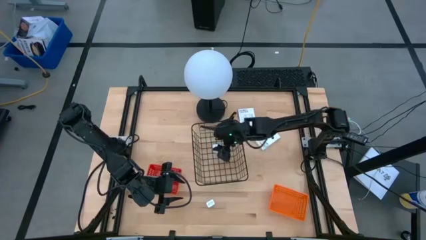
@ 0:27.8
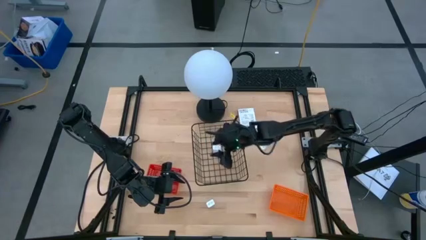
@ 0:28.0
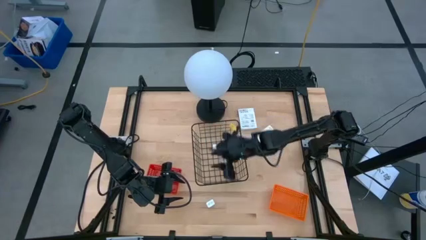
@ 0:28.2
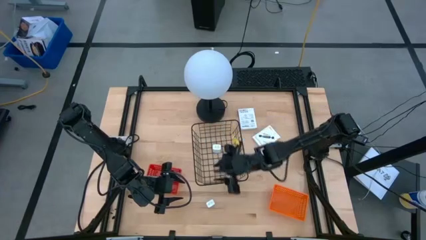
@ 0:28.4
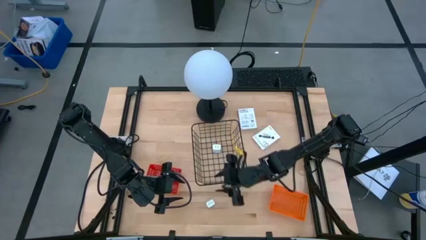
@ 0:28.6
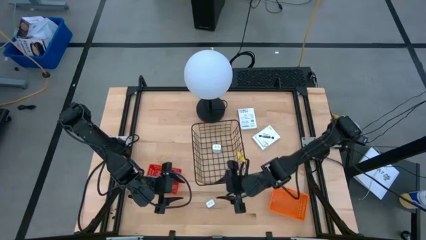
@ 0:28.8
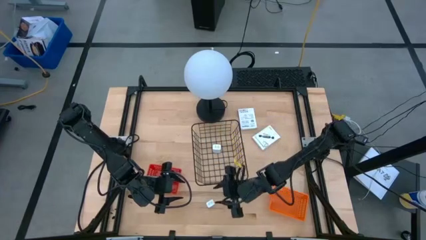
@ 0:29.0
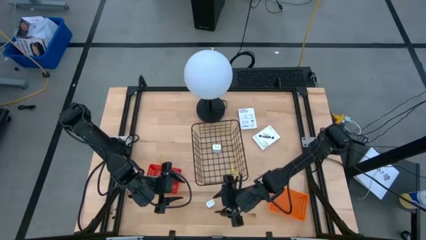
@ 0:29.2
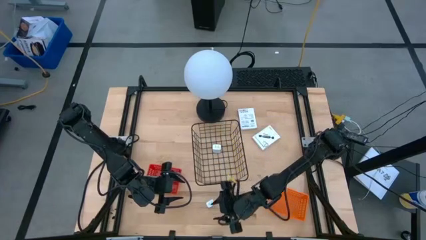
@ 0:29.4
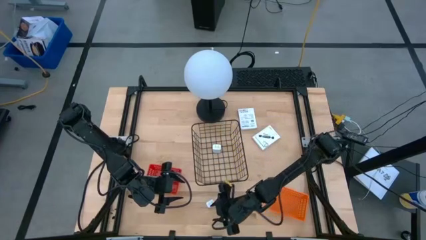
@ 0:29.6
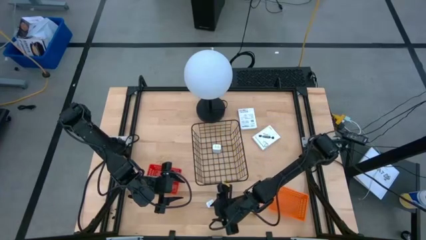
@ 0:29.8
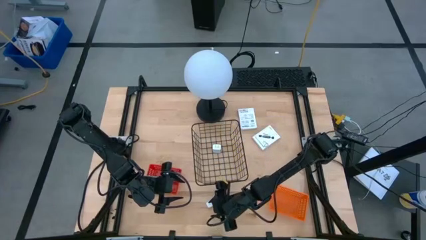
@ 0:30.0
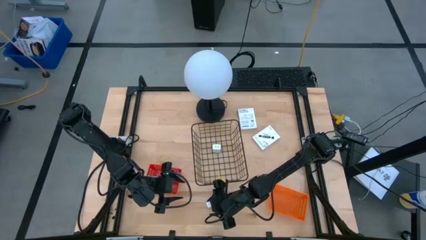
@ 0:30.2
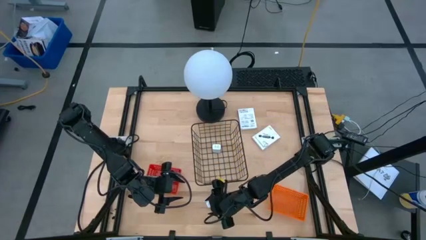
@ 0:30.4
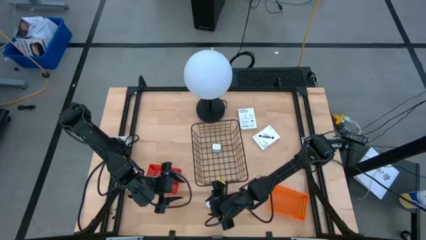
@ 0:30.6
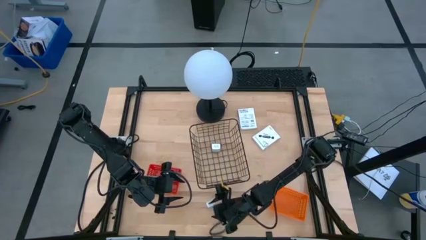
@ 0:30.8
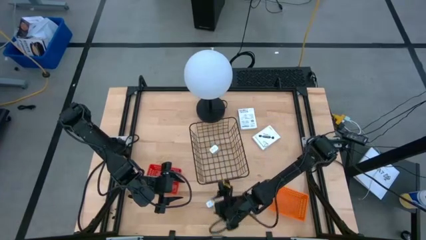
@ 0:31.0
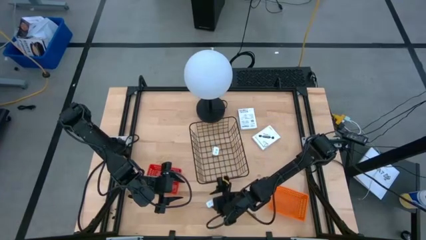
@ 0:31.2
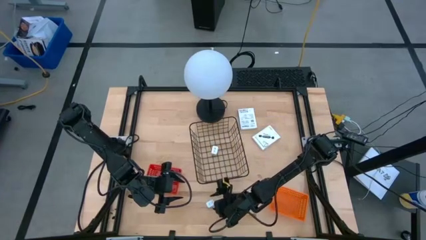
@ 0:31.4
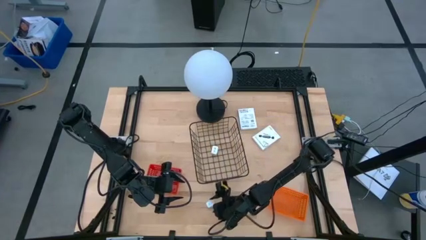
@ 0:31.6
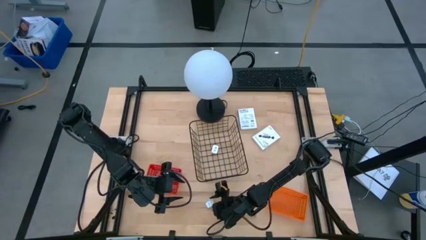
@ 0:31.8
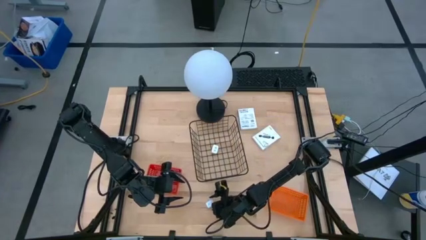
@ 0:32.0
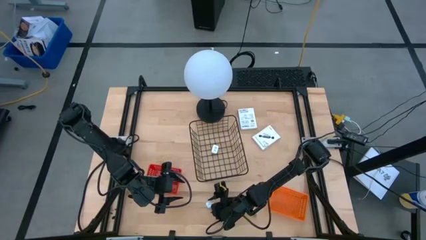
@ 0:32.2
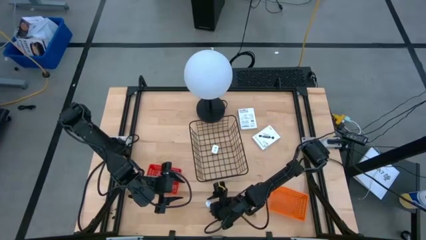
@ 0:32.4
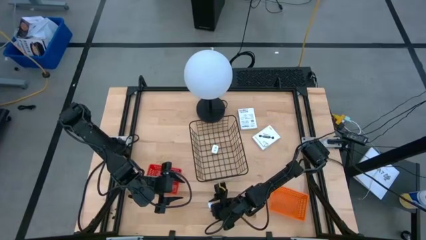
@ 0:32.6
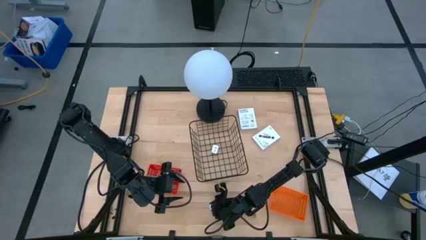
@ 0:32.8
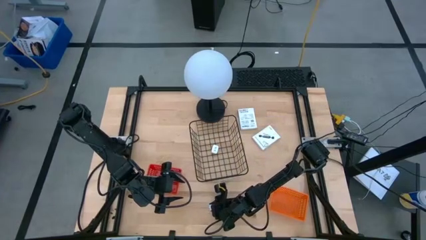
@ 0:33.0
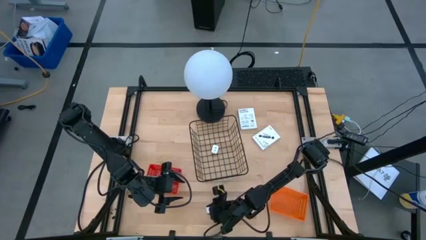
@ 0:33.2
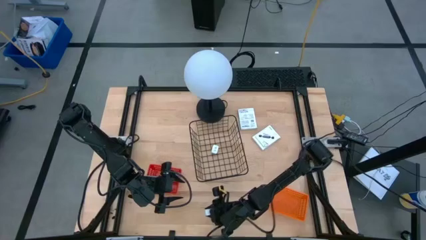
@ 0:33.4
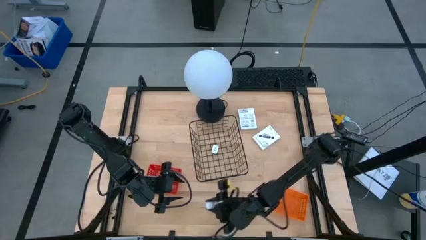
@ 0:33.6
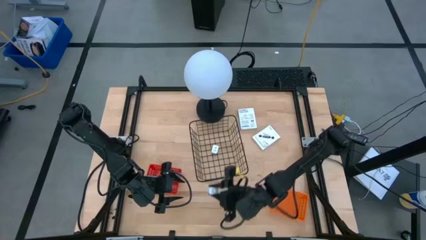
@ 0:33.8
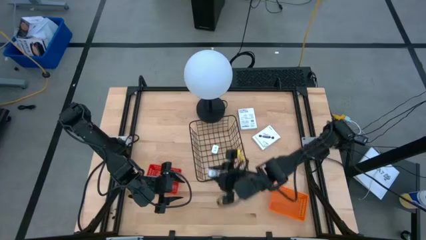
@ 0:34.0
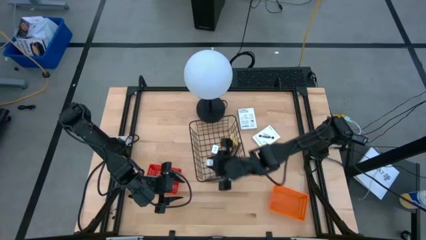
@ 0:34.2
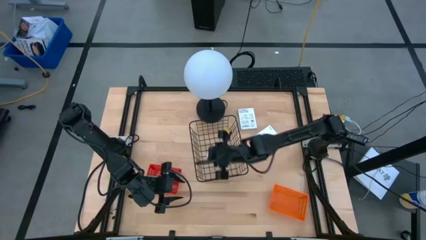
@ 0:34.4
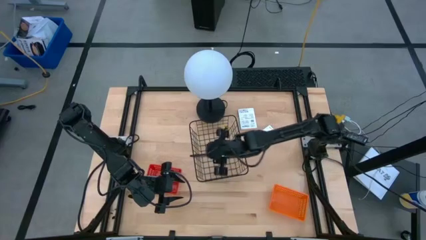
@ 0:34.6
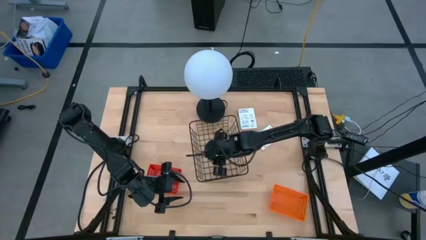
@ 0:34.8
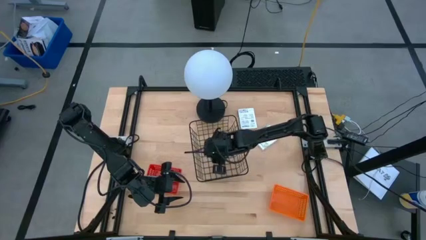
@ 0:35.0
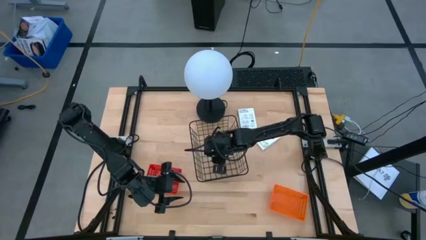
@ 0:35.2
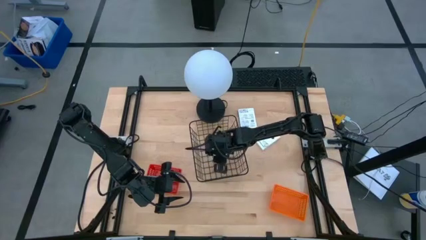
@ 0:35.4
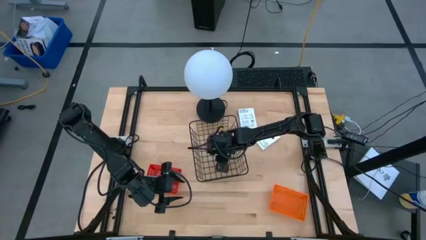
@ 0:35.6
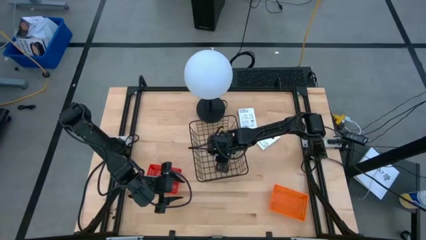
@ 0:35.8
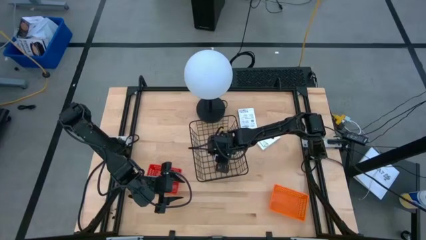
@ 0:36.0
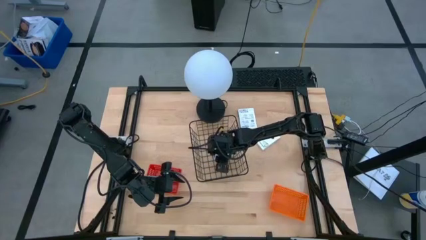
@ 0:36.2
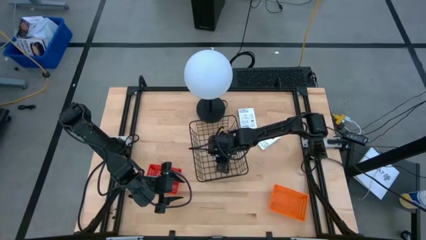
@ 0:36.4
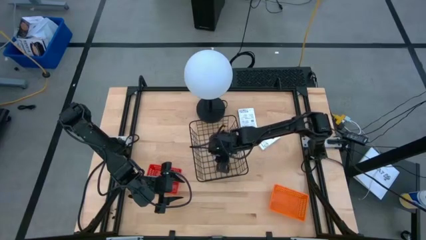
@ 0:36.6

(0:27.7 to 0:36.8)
Task: Pick and place items into bin
Put the charger adapter into the wire basket

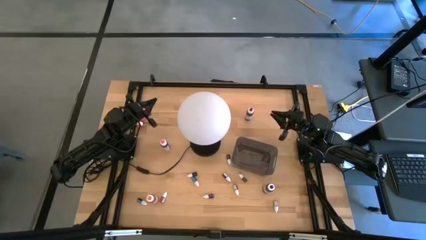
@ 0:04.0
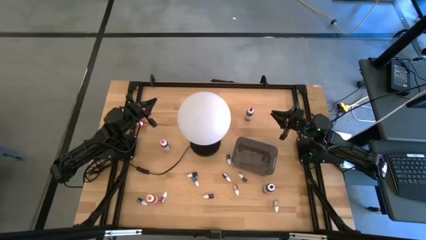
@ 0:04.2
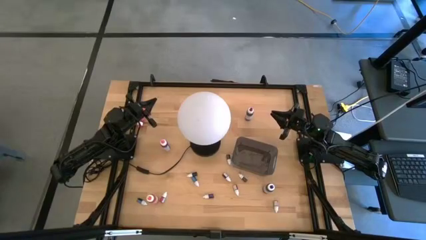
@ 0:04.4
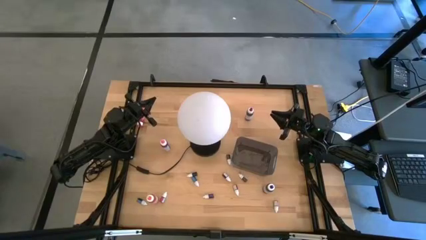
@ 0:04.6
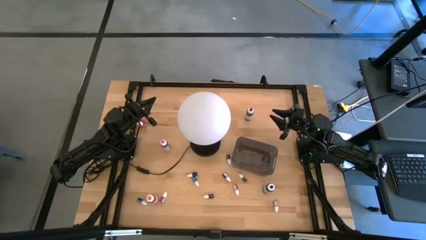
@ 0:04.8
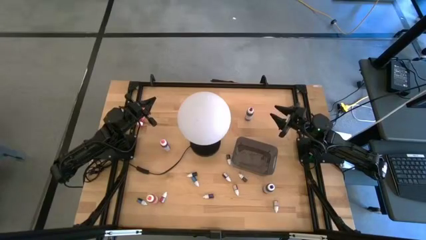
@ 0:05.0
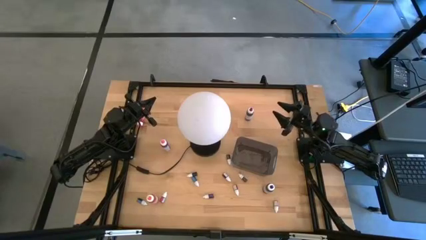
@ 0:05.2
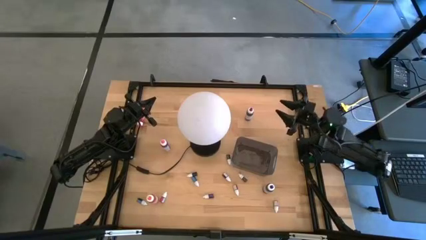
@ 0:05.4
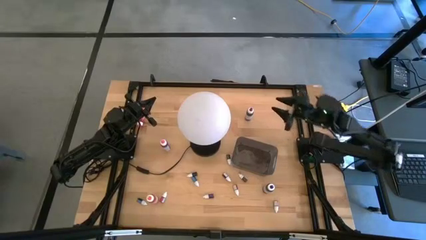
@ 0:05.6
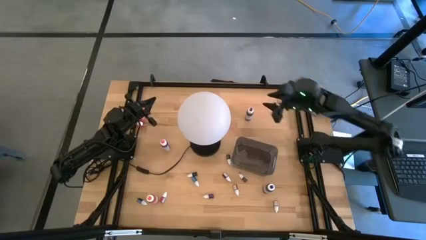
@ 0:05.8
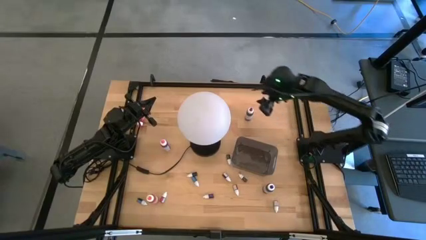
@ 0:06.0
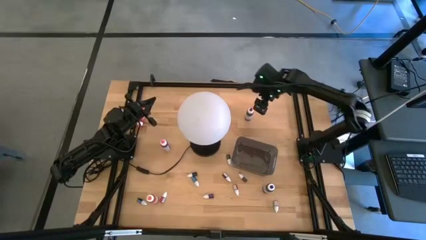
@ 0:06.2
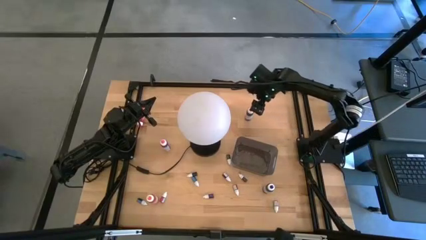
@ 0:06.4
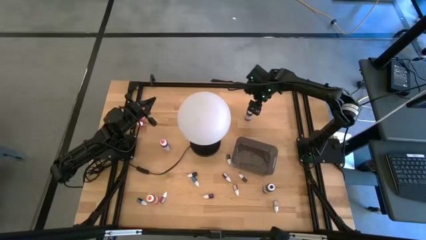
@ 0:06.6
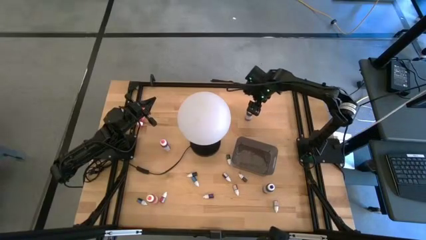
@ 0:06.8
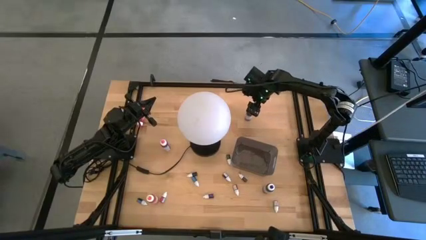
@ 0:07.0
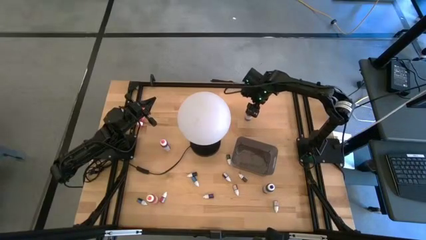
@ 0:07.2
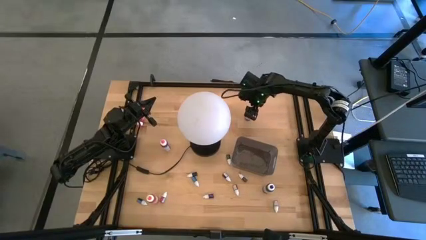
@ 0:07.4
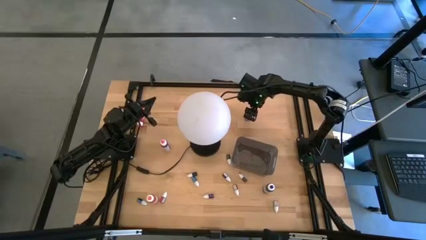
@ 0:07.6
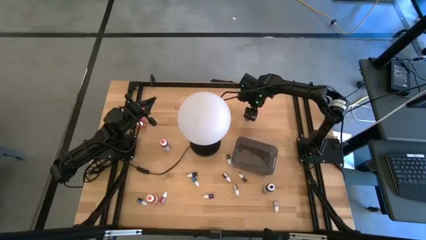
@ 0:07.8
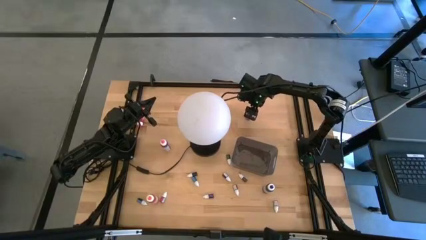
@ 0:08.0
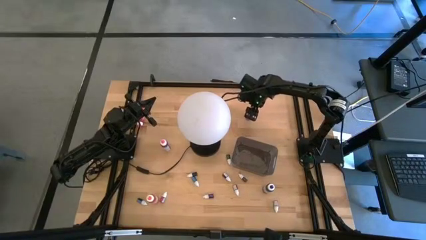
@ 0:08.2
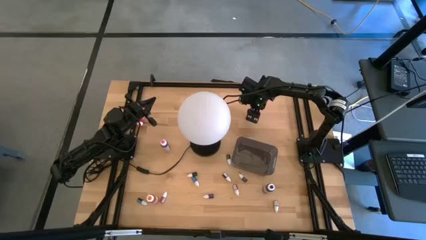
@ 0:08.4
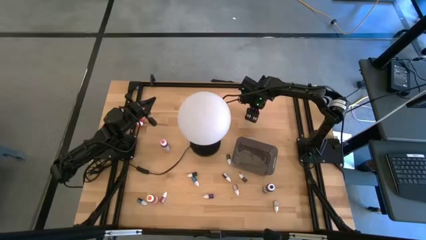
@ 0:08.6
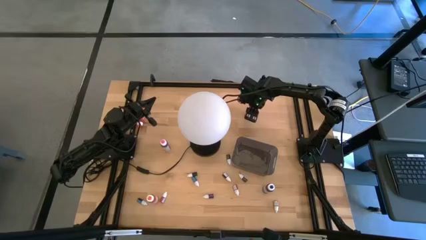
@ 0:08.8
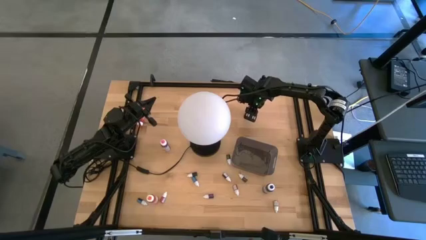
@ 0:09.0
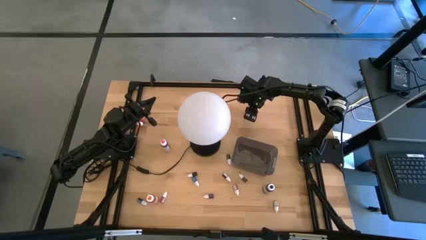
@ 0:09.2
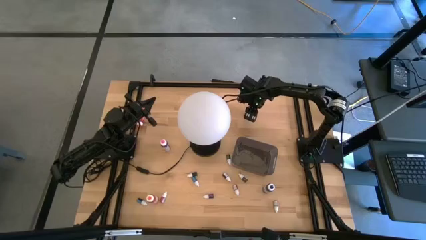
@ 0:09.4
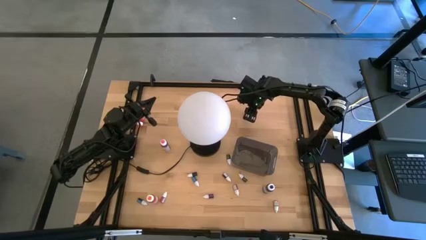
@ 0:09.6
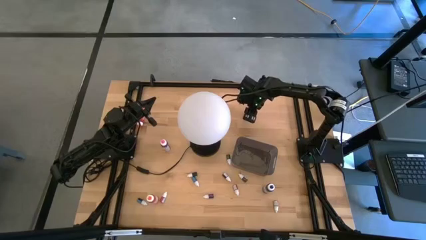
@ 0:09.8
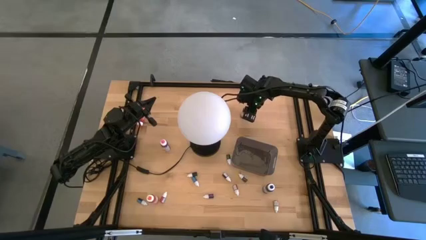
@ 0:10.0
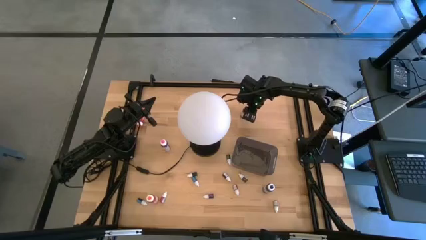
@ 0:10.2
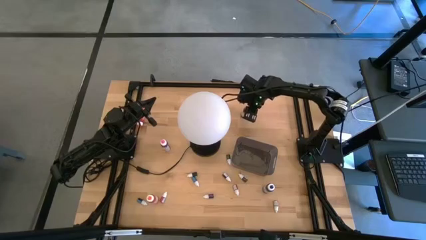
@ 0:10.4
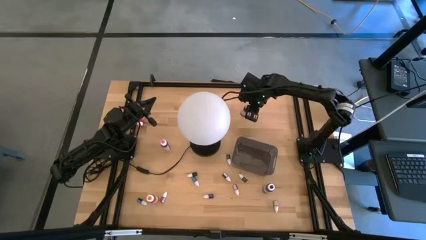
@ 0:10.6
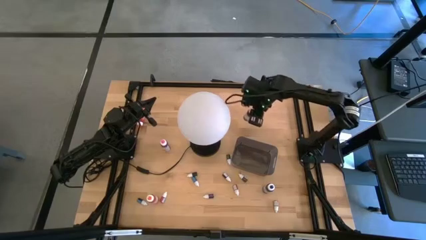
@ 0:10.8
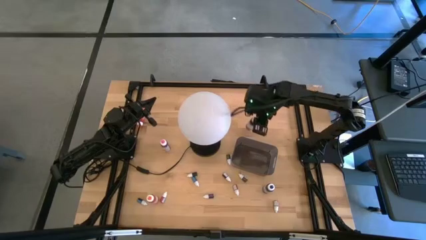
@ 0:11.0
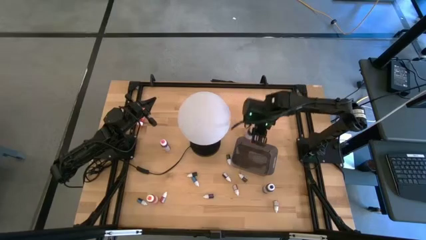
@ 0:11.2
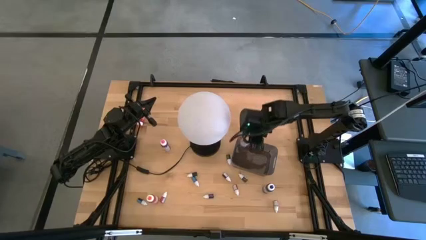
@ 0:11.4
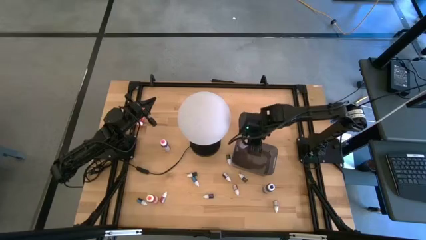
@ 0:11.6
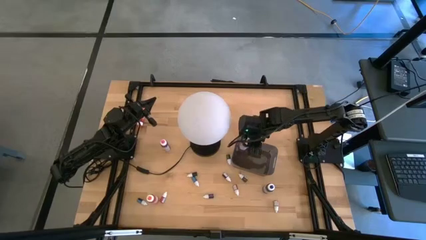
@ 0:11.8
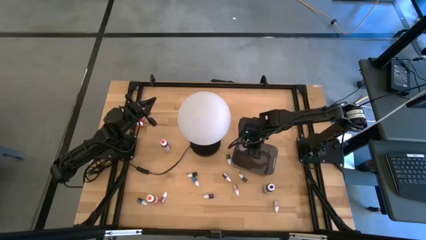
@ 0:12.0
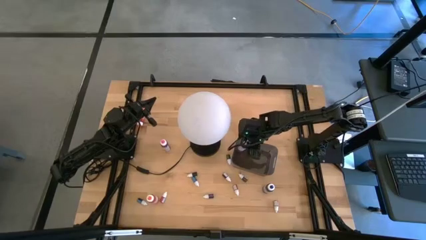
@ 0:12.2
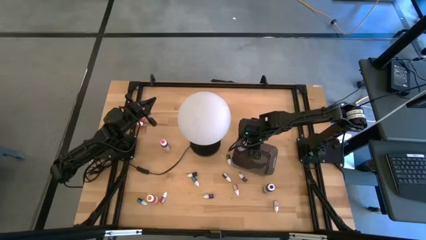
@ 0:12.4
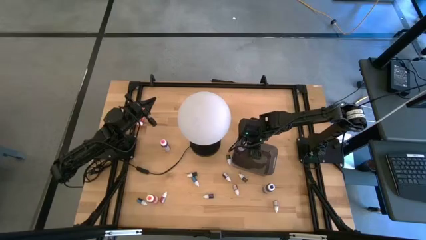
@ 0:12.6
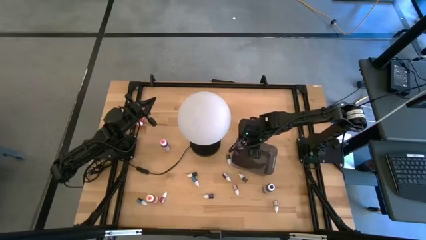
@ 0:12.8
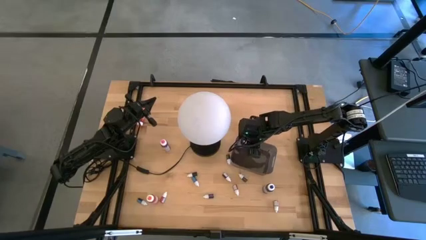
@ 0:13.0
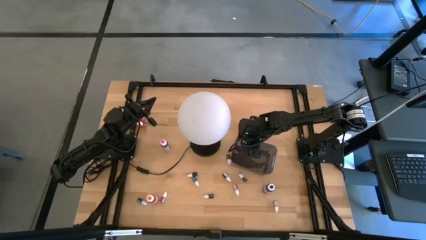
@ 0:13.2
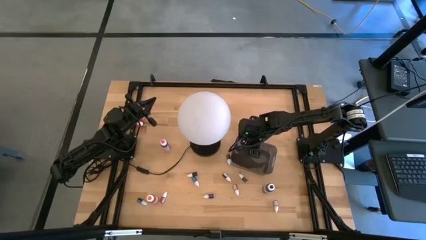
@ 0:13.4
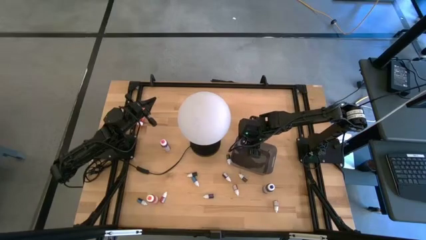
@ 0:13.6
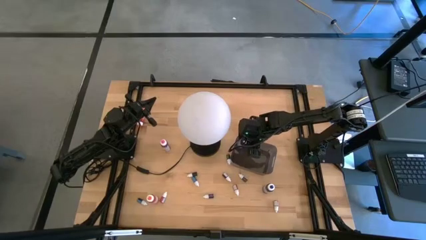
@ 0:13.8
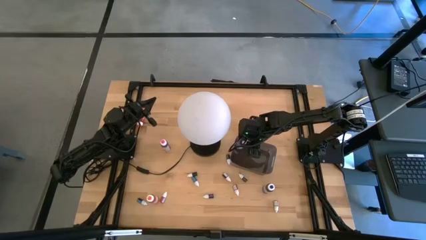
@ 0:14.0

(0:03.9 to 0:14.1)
Task: Pick & Place food coloring
Put the large purple food coloring bottle into the black container
